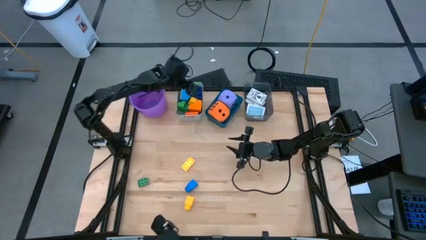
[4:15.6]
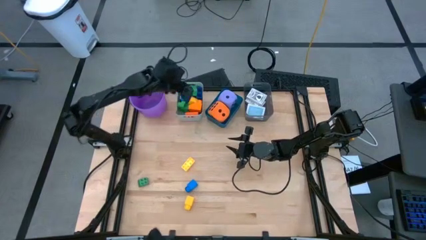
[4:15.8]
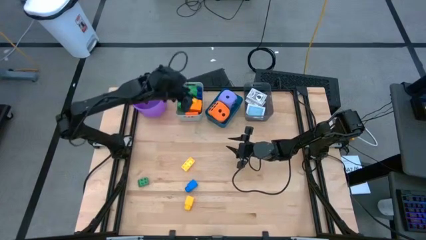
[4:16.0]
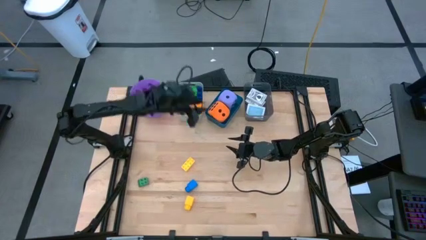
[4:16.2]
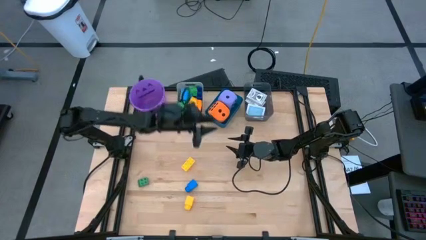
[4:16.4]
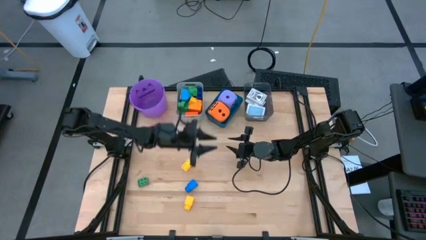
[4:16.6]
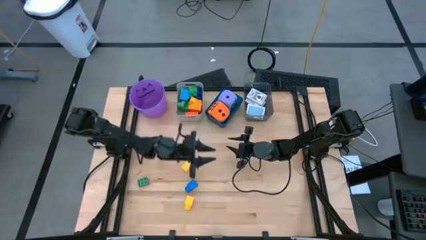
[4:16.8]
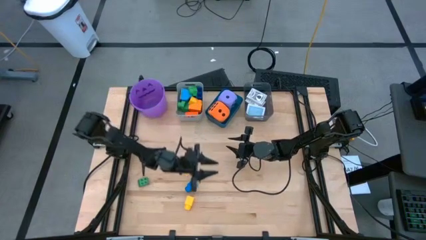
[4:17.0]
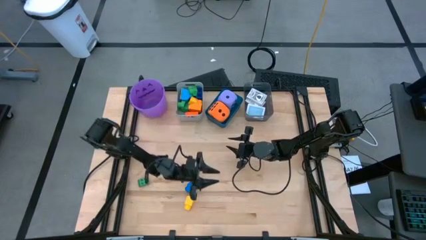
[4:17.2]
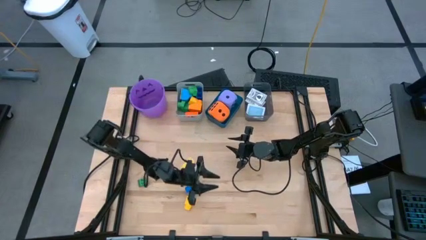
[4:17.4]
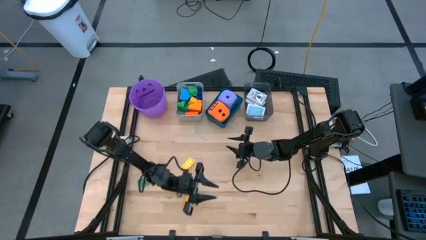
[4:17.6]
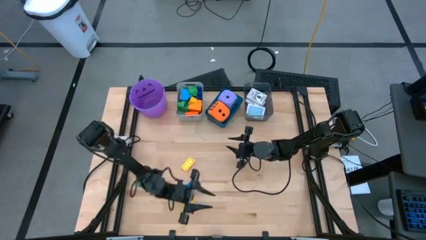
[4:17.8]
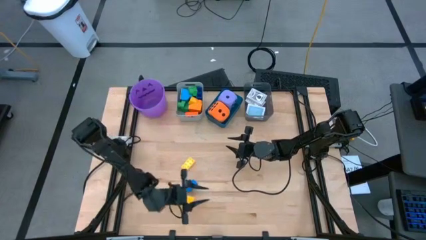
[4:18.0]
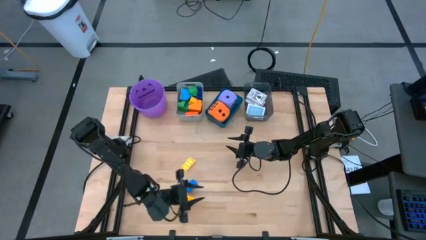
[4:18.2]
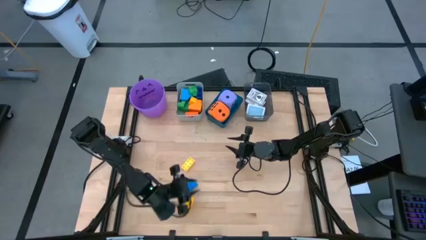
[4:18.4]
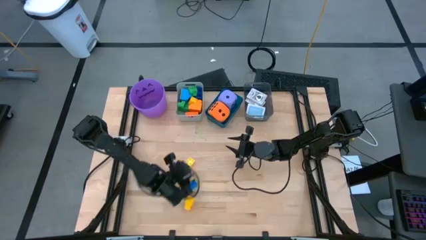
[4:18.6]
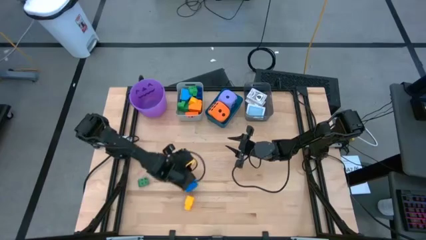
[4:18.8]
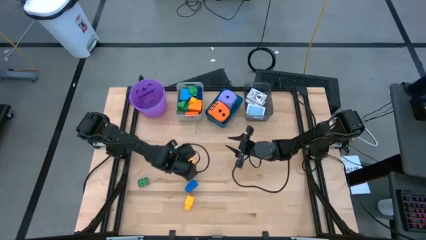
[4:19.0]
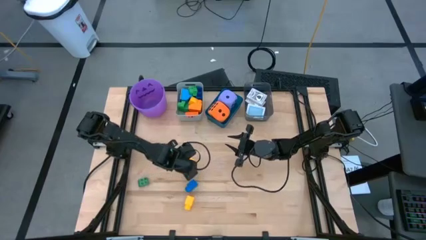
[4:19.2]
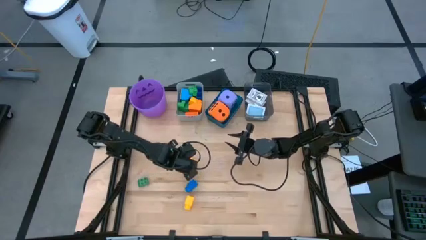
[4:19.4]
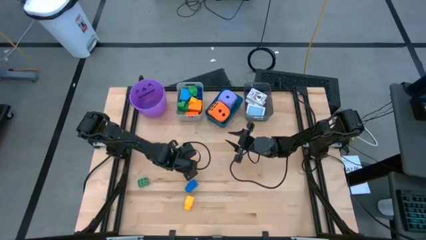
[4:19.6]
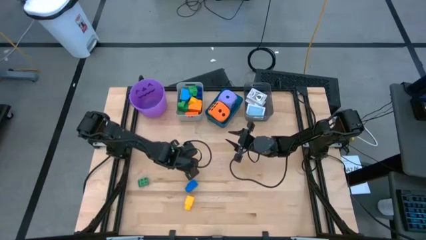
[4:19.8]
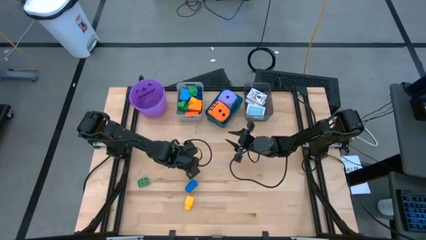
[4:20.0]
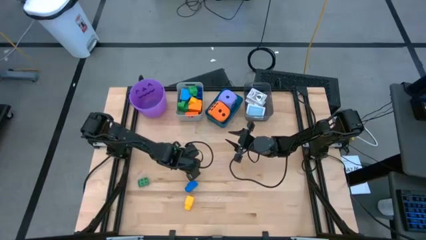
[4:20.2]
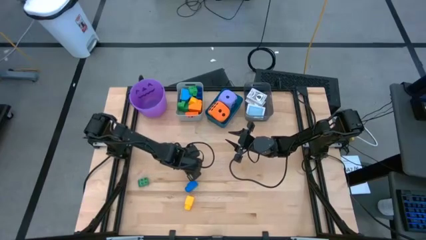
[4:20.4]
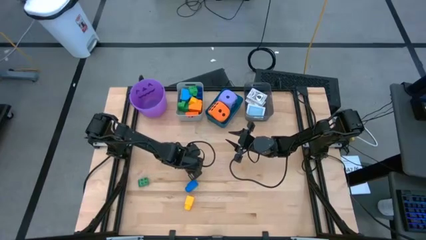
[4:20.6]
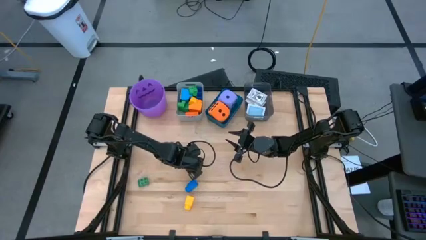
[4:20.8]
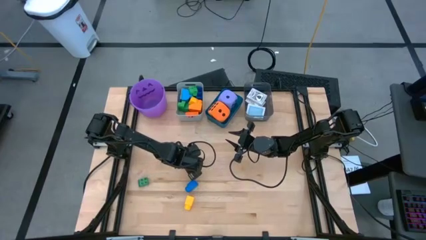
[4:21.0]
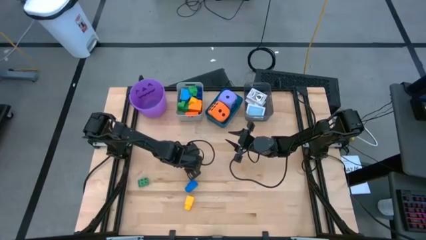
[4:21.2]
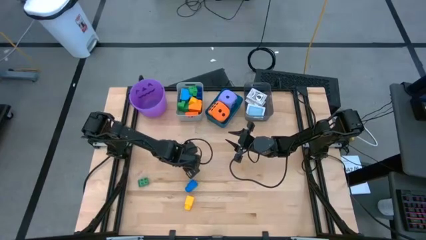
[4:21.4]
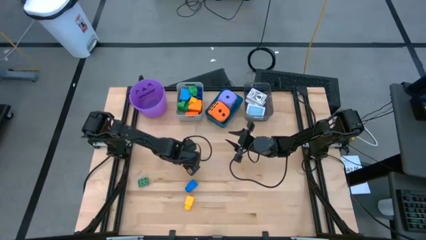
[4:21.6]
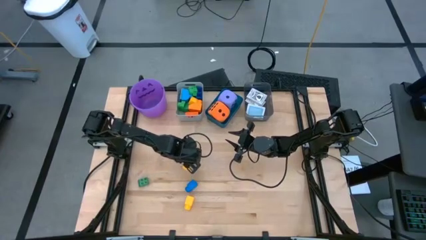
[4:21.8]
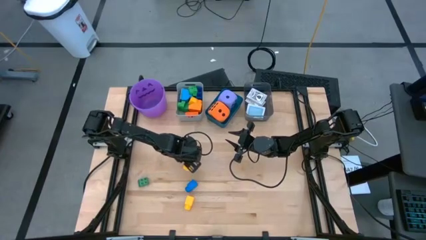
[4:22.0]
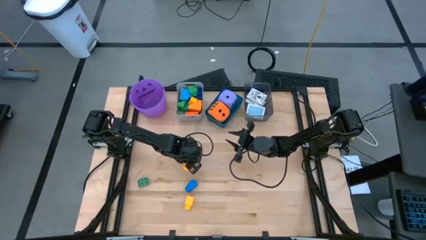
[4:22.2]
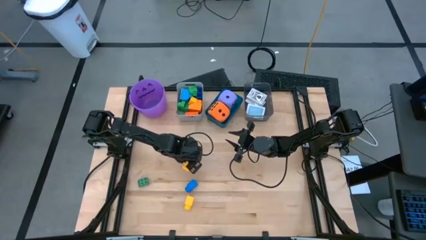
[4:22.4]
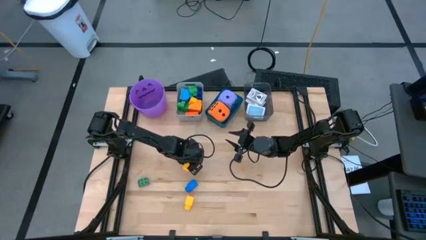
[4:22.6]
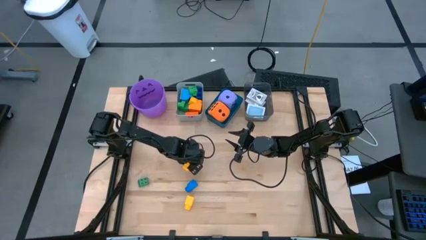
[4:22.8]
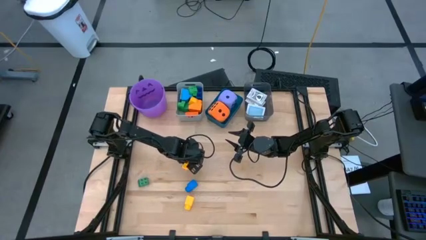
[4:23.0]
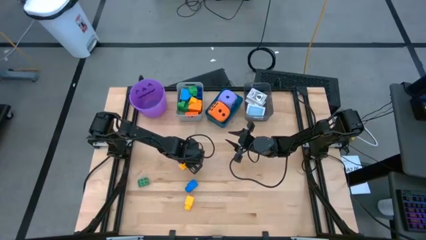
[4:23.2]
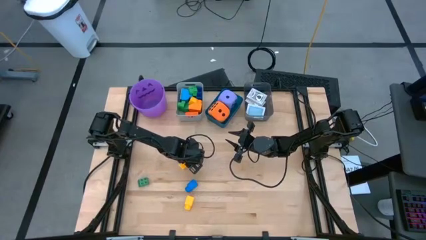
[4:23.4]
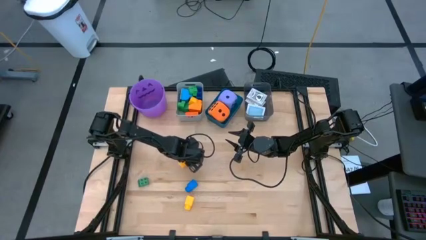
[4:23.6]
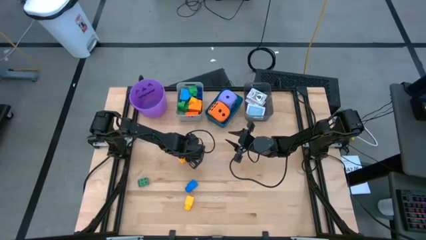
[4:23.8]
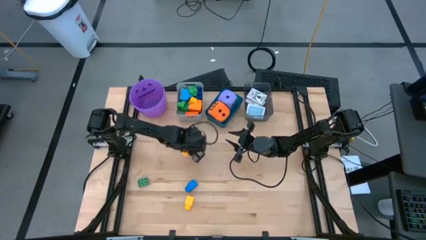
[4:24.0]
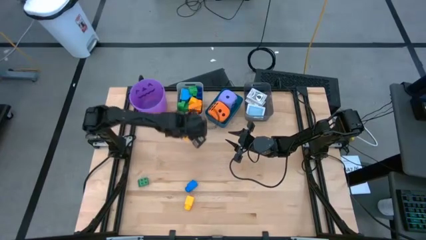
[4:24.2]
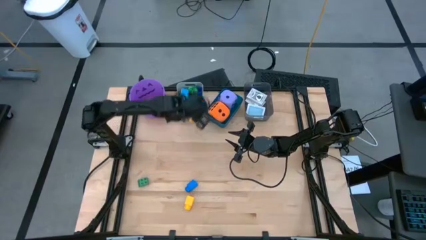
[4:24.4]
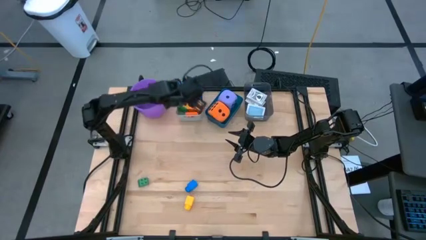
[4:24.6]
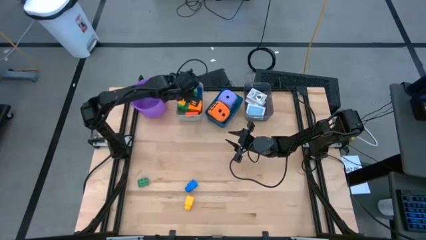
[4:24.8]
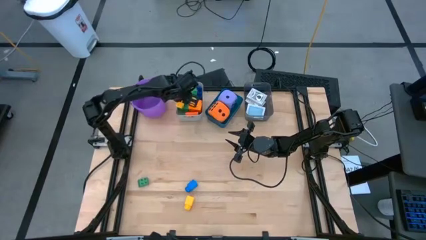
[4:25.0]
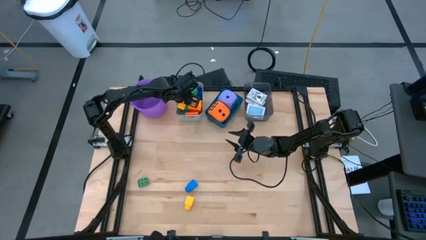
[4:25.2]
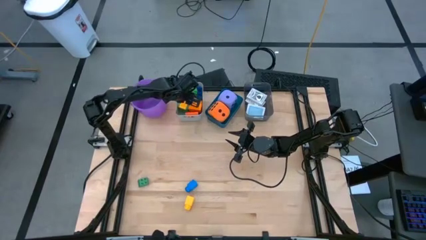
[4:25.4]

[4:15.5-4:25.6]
Task: Pick & Place Toys
Put the yellow game piece into the gray bin

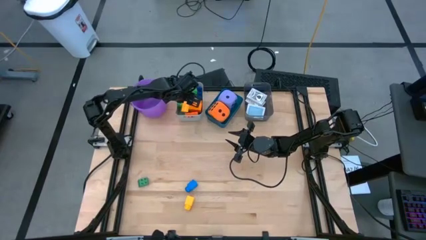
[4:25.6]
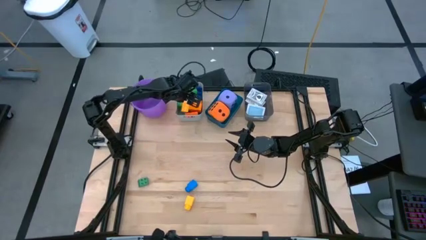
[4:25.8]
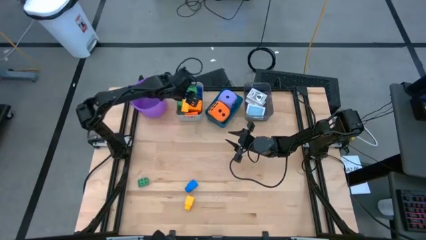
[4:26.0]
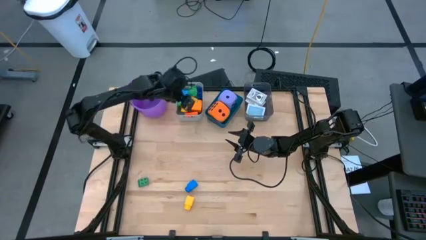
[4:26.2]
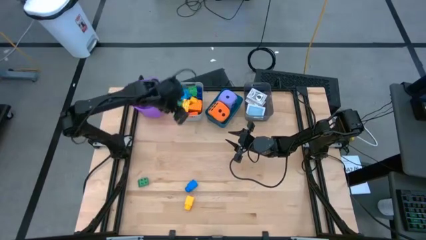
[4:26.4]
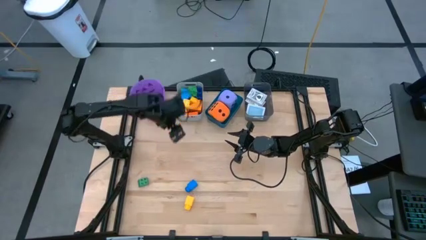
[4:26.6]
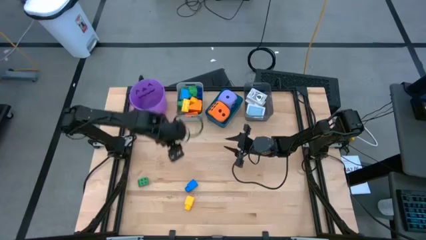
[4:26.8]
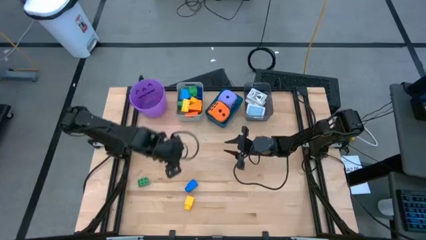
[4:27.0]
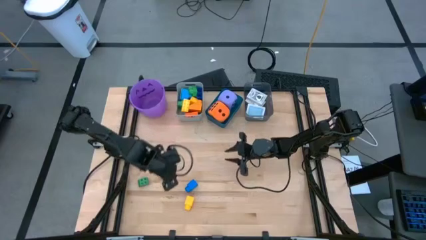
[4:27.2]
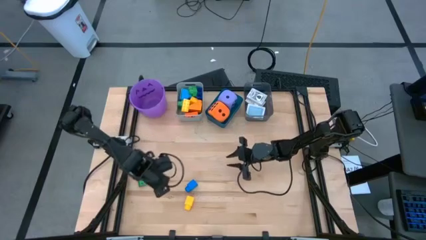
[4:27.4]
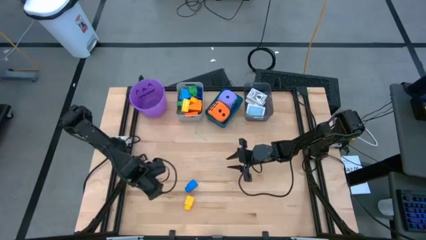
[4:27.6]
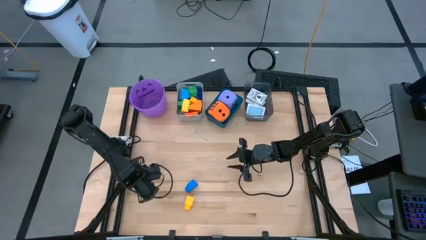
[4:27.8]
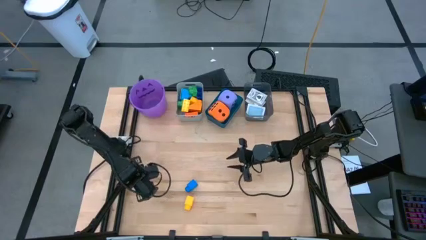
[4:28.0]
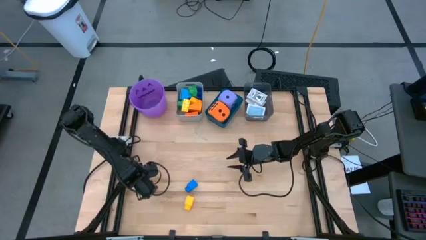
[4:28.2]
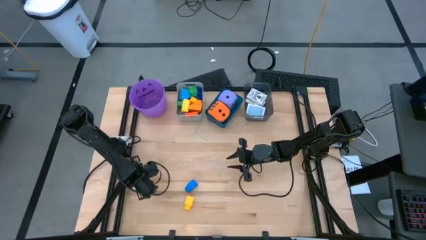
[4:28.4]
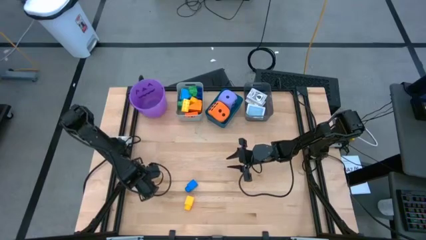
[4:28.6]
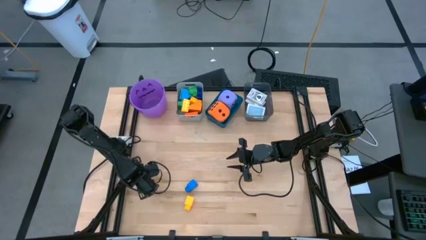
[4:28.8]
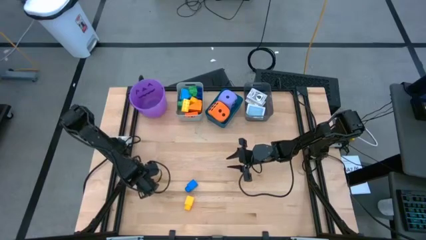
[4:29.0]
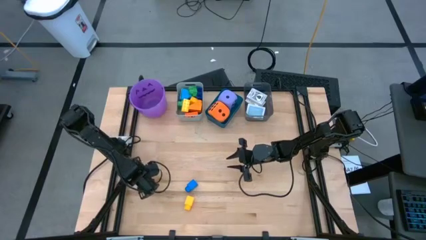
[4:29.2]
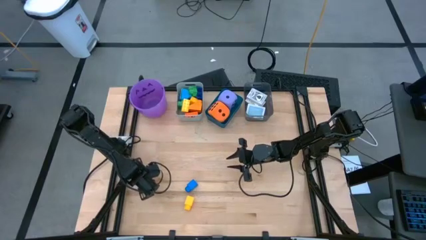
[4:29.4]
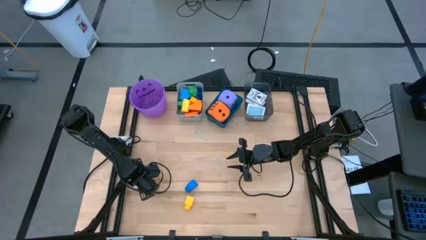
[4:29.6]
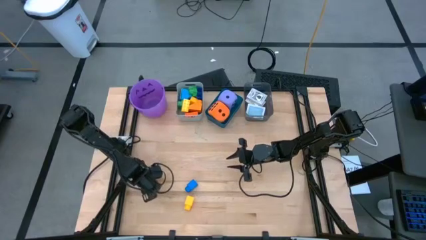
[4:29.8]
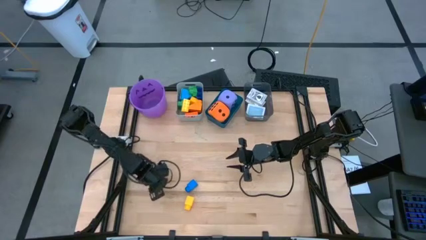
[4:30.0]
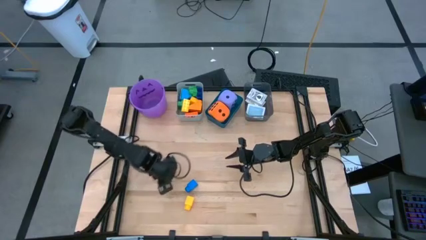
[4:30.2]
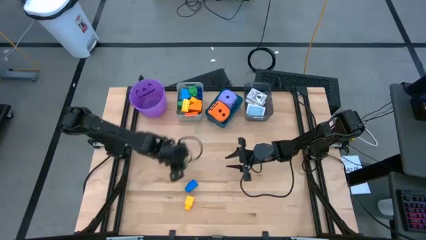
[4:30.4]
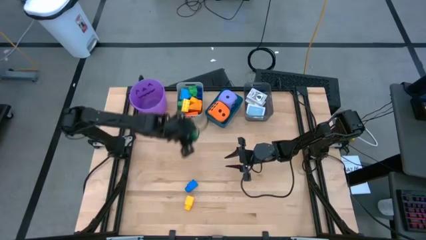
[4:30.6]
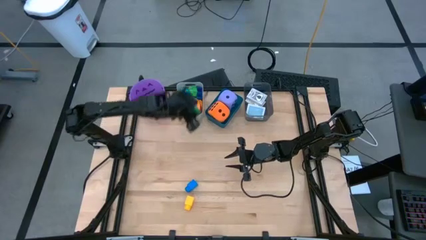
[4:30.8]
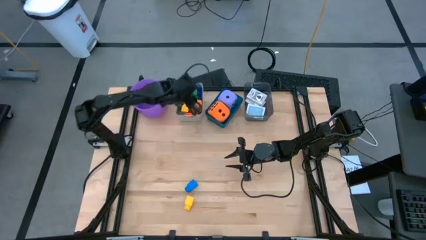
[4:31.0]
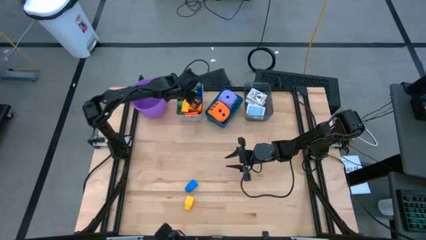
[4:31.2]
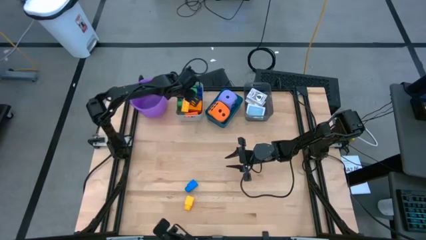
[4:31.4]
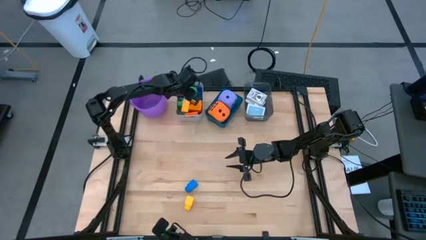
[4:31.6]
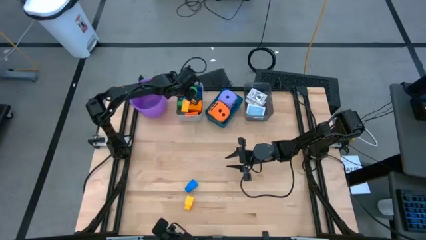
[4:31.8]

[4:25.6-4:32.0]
Put the green game piece into the gray bin

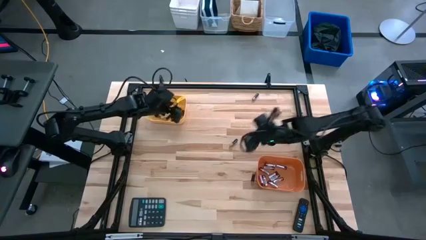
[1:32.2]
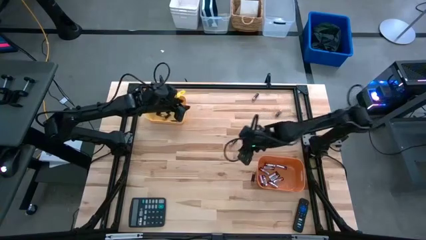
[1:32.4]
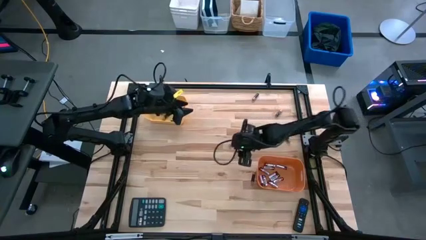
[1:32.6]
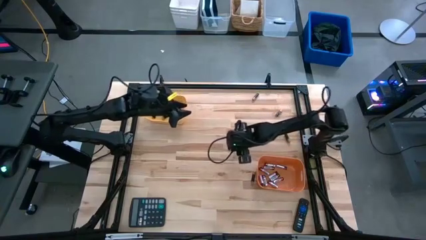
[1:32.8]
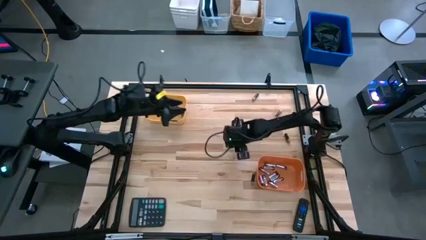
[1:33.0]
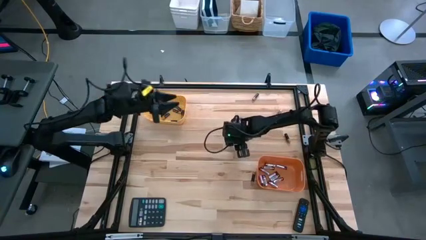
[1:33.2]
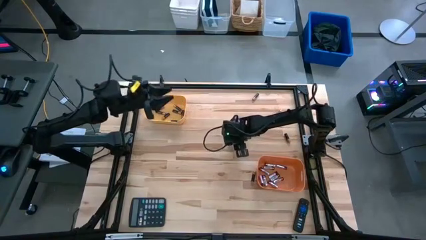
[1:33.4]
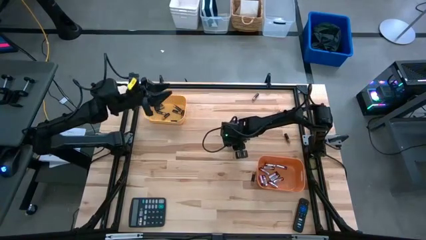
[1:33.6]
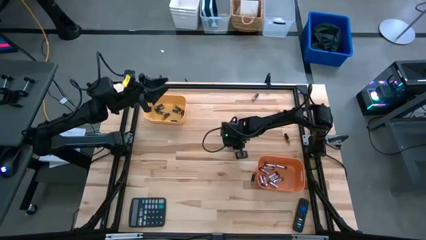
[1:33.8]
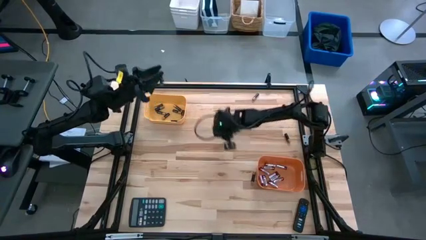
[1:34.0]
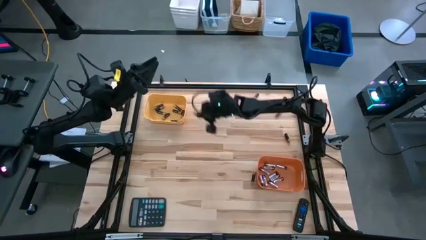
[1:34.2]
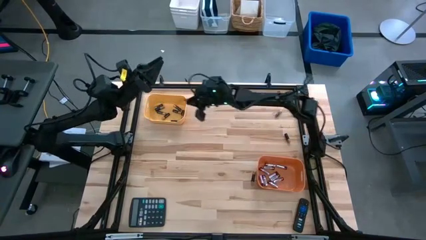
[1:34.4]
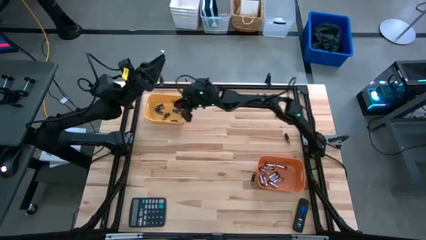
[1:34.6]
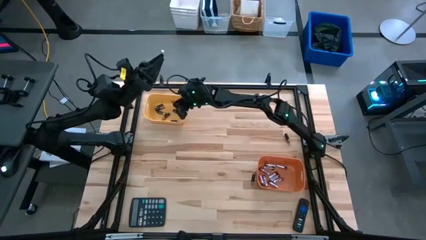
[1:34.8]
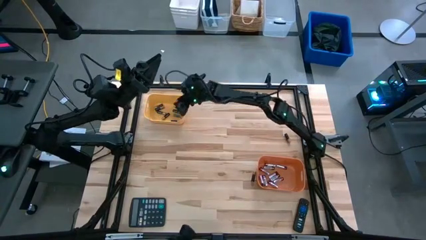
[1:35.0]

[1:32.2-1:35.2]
Task: Sort batteries
Put the black battery into the yellow bin
